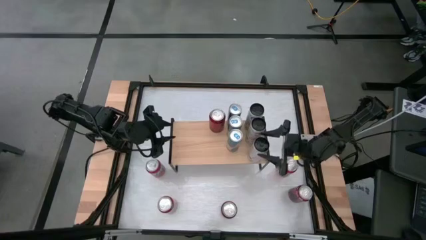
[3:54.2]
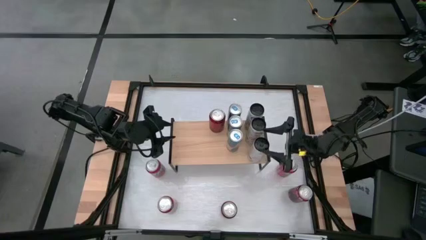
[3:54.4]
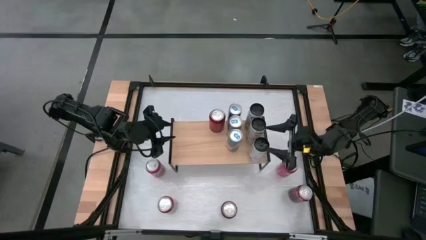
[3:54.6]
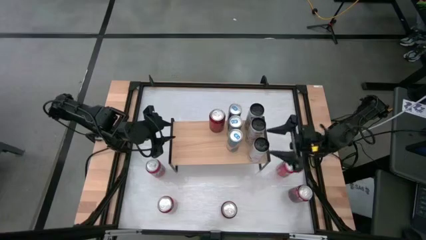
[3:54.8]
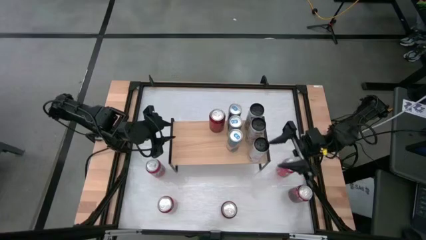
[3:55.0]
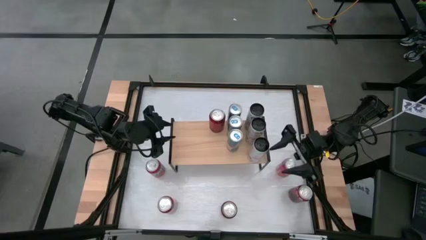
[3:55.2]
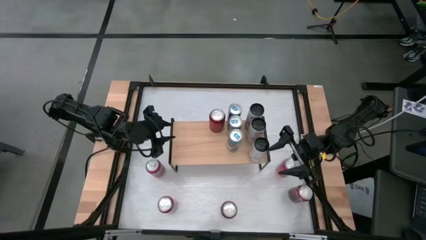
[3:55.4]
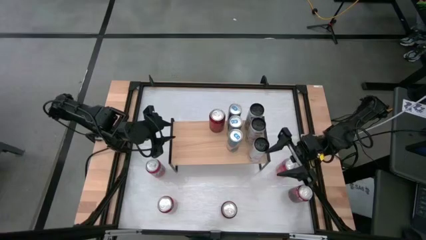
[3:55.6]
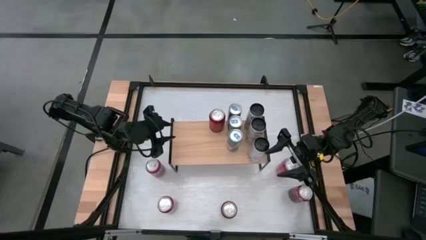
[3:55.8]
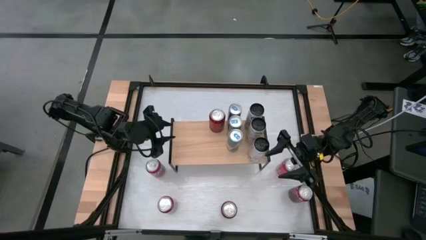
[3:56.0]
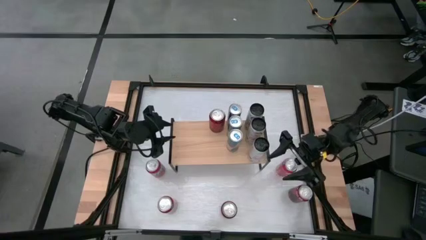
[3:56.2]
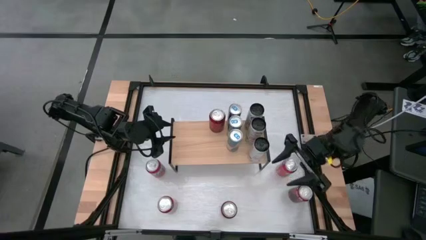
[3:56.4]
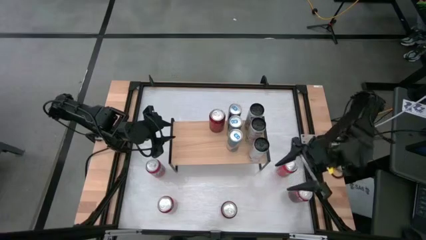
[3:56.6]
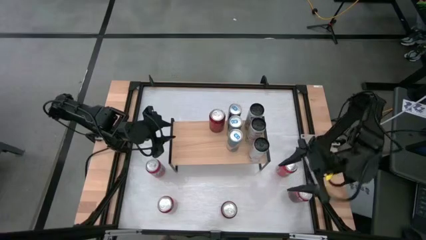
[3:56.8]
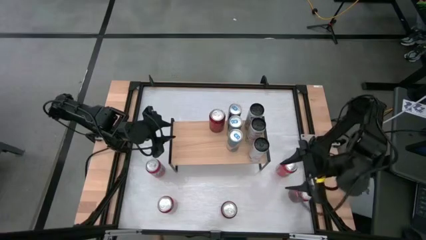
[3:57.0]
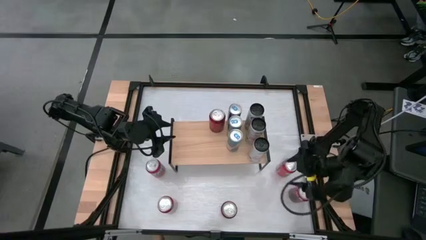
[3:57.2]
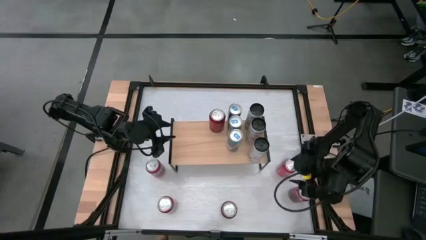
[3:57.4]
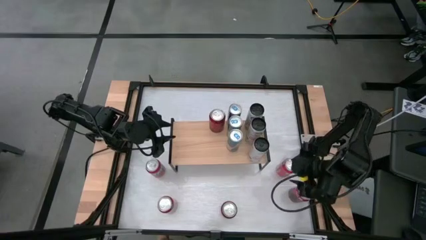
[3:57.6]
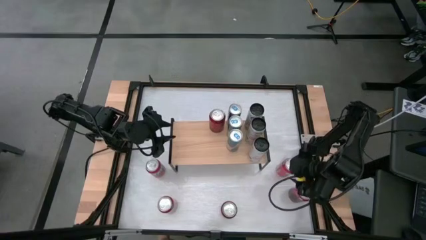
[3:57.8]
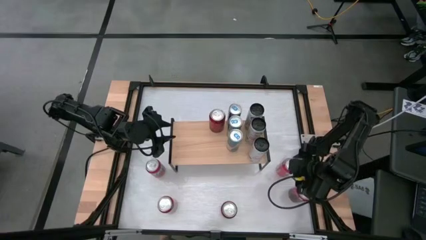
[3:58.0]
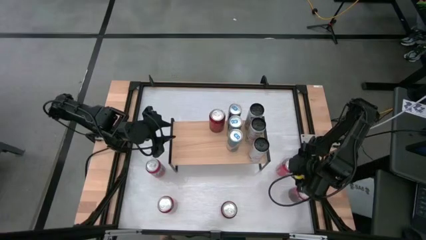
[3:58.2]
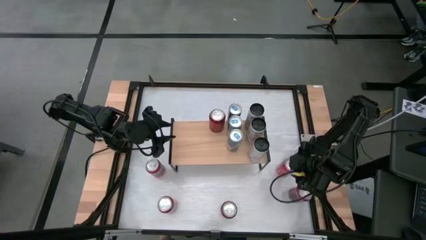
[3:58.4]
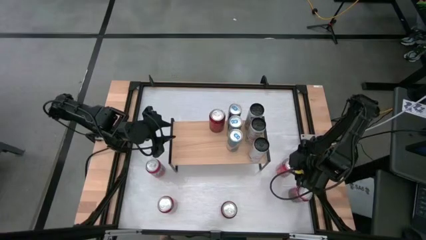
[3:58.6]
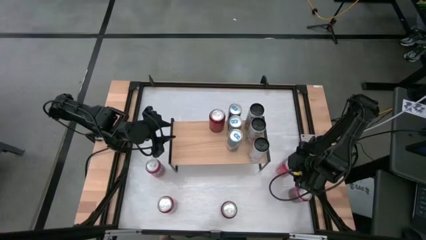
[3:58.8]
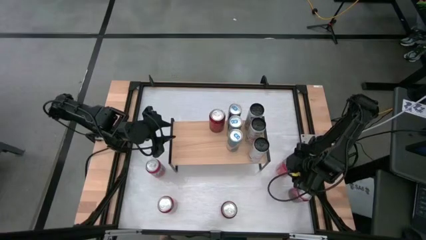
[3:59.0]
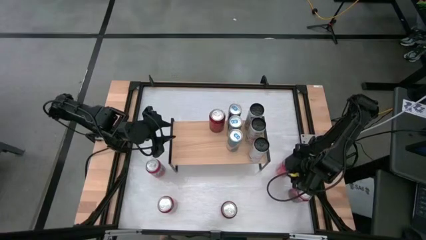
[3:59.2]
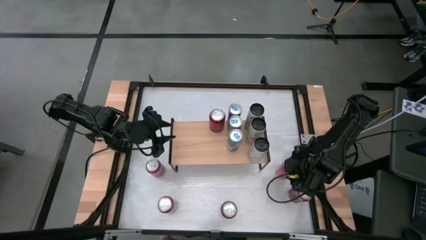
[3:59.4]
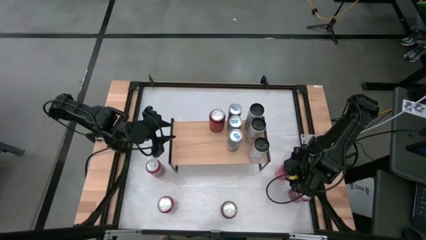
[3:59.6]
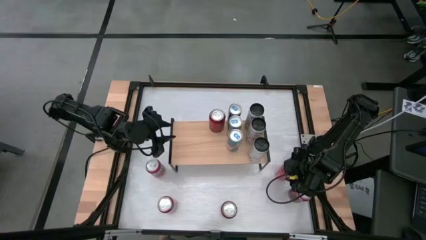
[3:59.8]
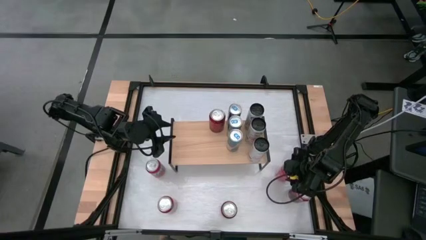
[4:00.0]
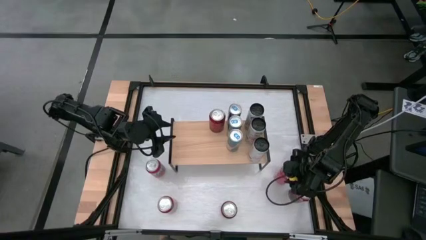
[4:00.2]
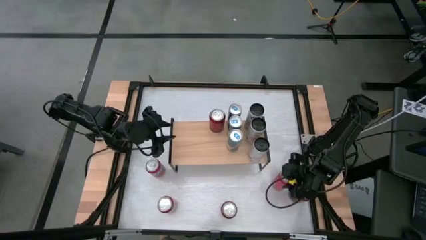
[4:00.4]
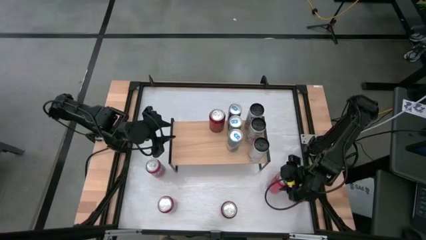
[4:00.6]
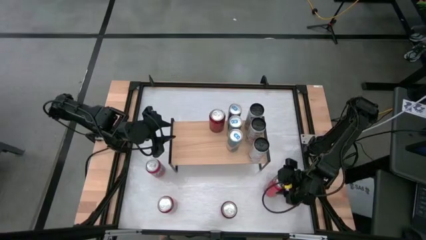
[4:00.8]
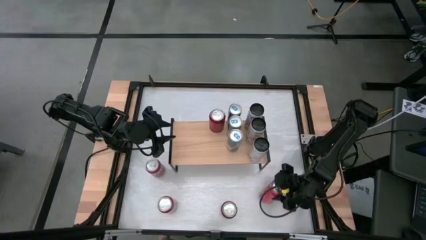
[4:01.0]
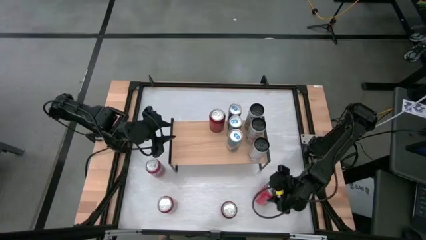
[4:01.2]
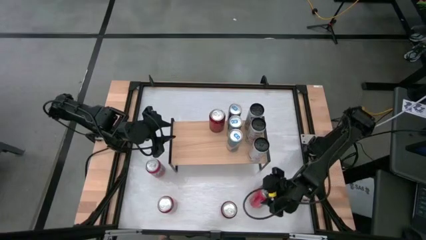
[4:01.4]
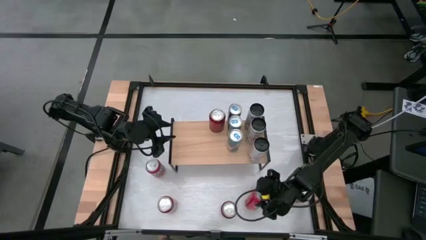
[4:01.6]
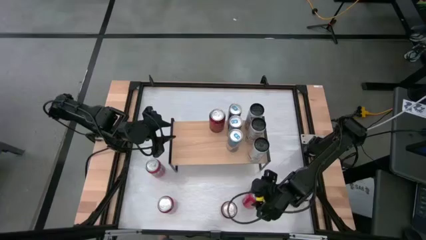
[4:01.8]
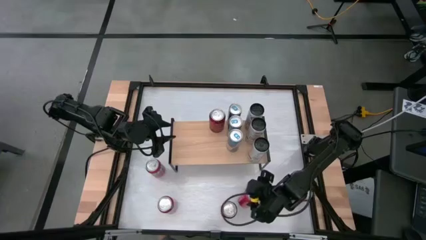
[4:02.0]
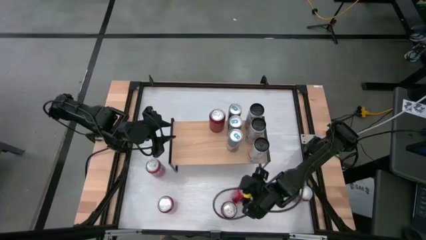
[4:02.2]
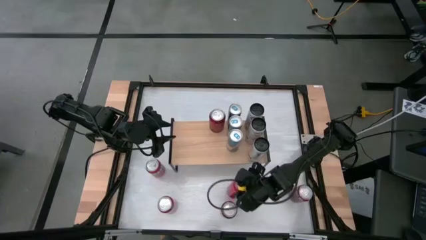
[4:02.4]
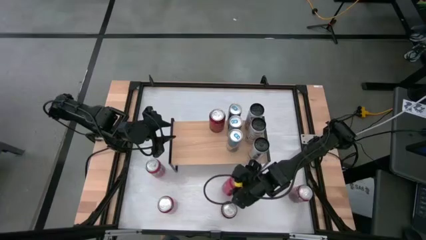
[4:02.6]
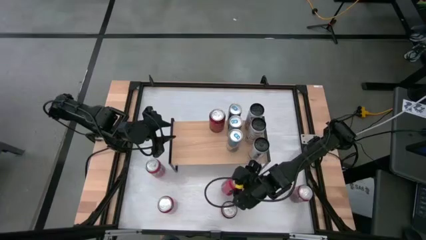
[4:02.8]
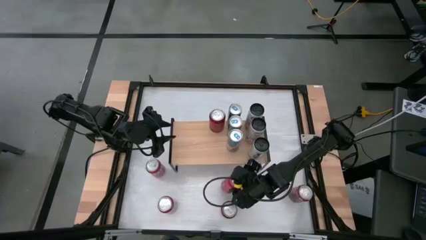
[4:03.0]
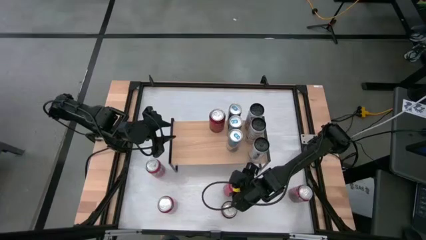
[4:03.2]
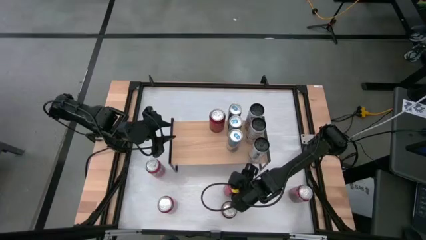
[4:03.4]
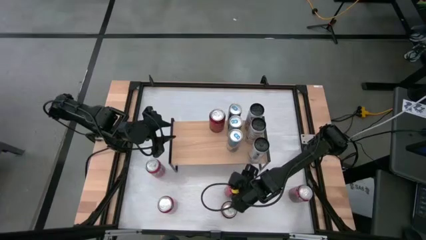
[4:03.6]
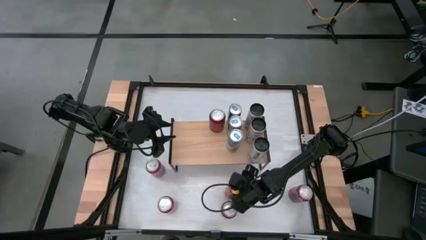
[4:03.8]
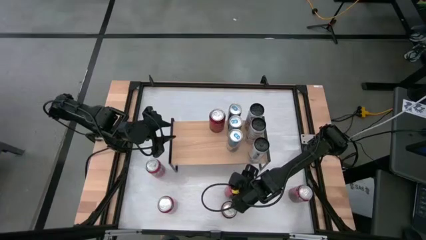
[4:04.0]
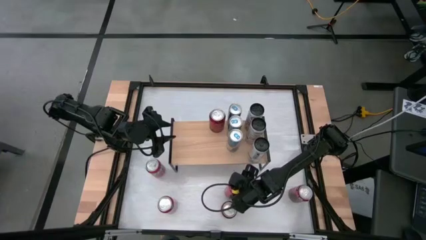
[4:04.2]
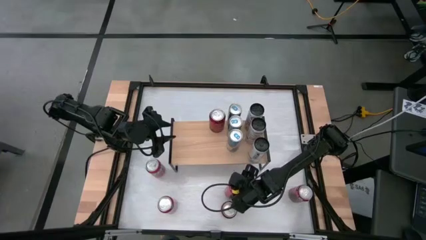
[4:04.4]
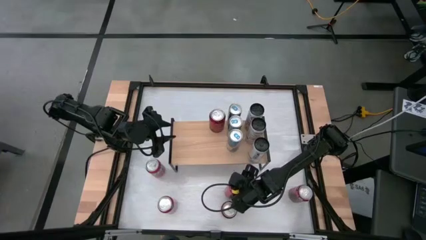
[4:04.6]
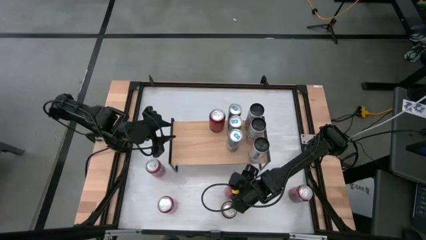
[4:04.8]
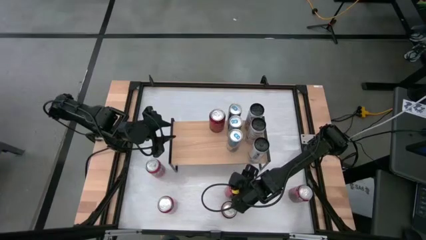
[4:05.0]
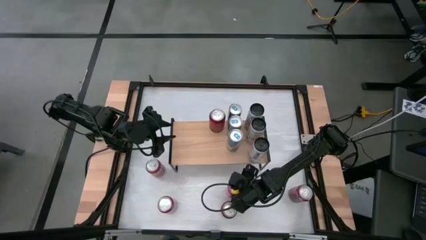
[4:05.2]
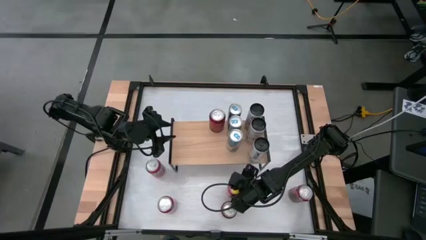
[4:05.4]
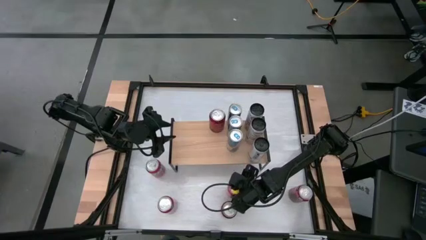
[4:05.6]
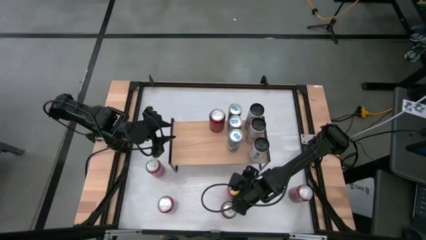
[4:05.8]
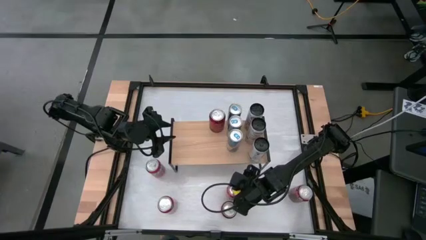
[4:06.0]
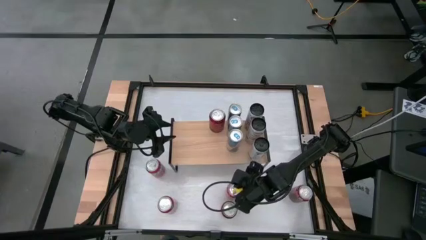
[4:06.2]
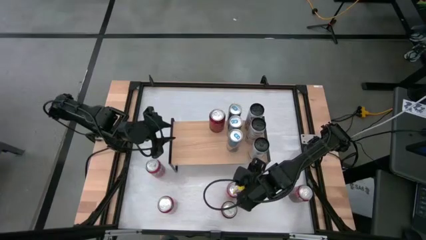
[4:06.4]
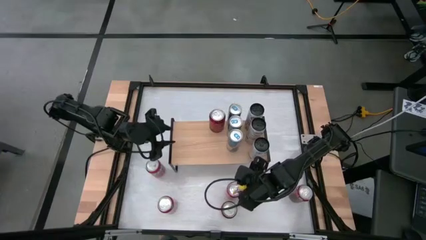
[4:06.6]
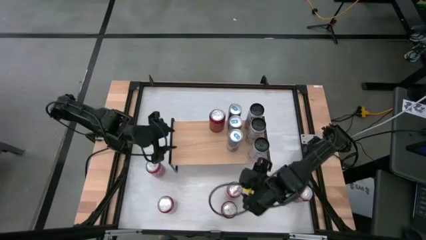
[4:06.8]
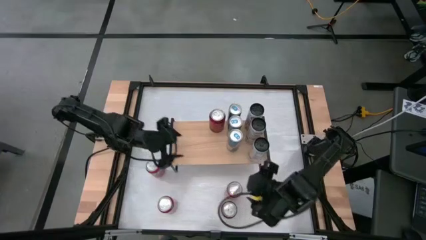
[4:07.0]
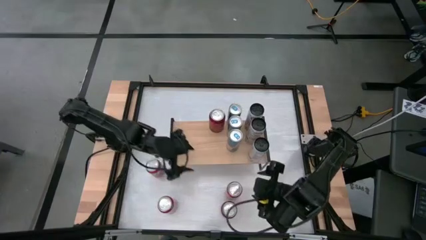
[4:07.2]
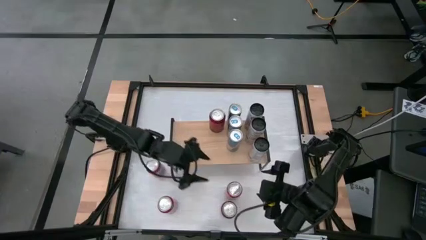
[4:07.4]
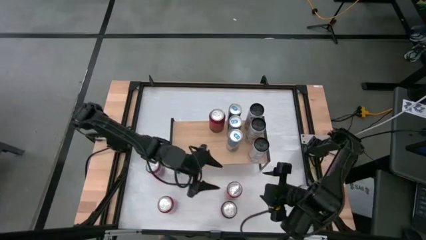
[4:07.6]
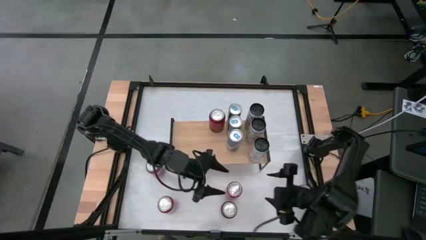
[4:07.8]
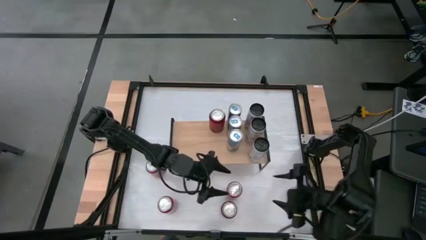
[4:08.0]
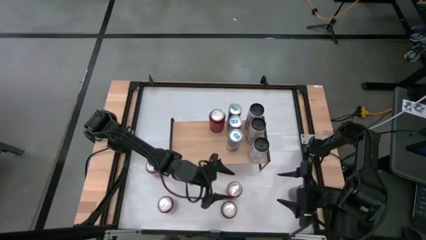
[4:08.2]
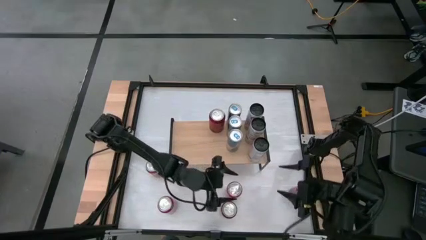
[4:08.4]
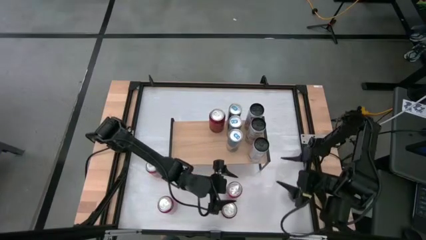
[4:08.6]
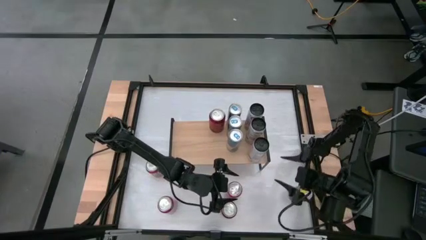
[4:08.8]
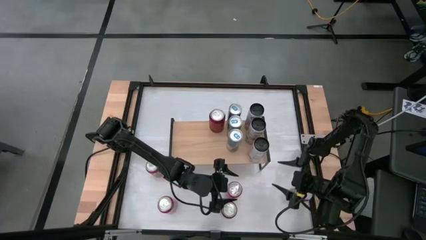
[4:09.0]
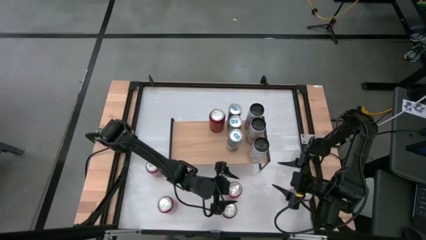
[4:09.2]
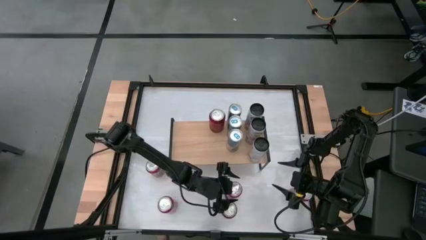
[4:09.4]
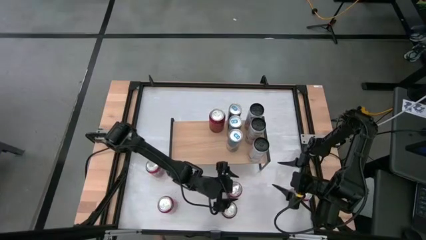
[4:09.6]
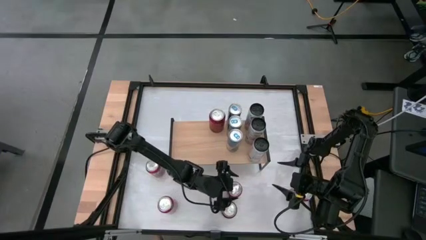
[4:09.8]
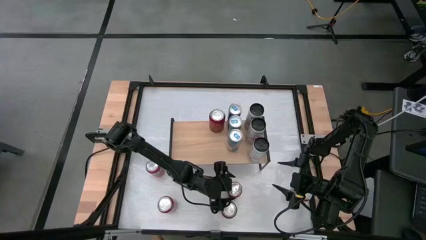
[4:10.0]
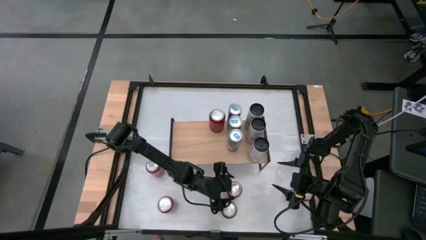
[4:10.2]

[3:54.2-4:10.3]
Task: Place canned beverage on shelf
Put the top right red soda can on the shelf
